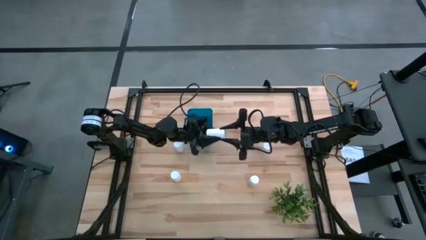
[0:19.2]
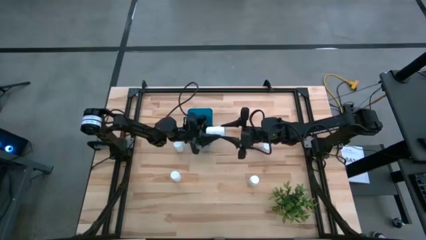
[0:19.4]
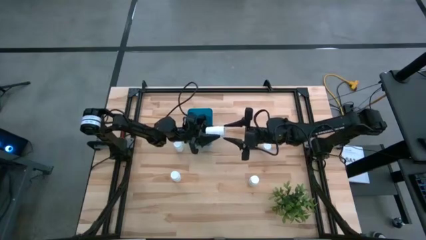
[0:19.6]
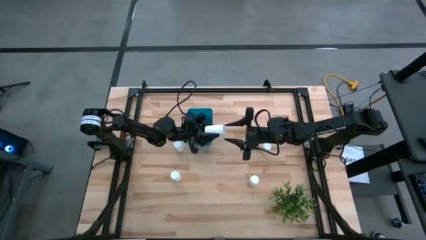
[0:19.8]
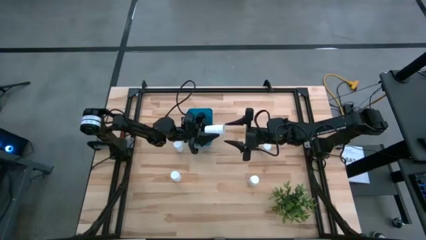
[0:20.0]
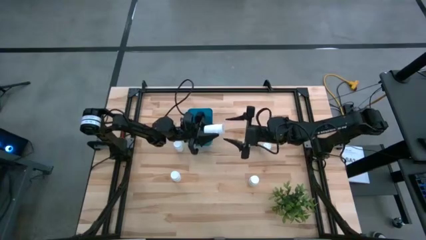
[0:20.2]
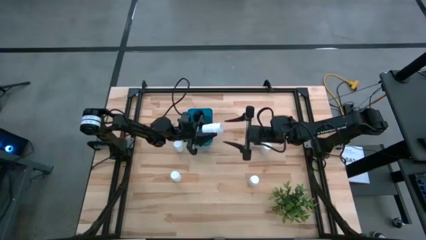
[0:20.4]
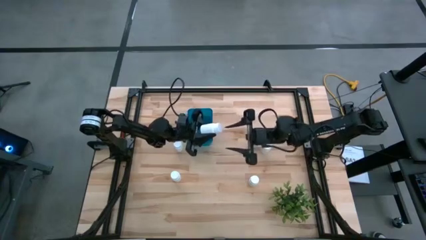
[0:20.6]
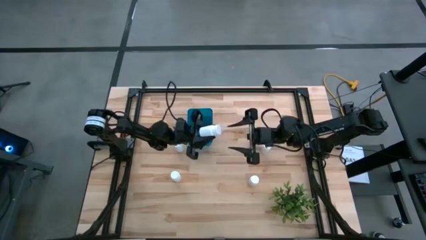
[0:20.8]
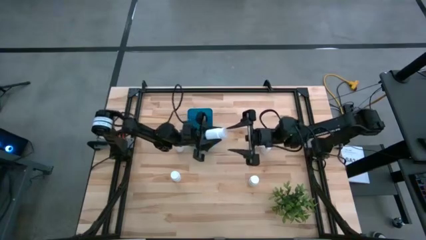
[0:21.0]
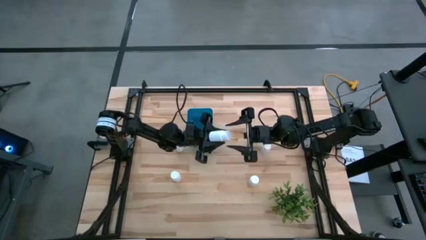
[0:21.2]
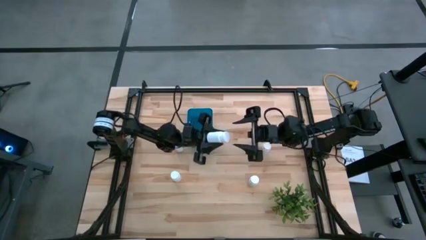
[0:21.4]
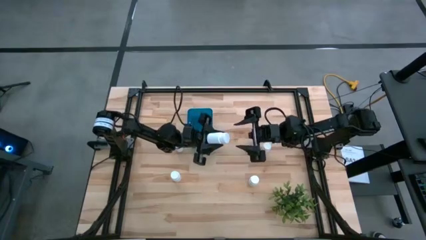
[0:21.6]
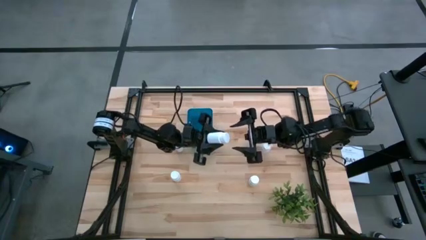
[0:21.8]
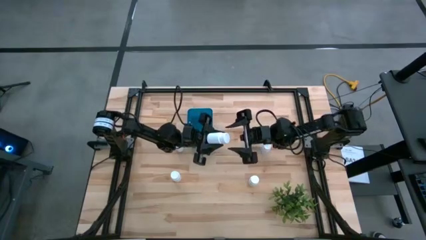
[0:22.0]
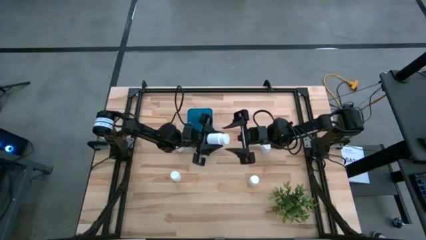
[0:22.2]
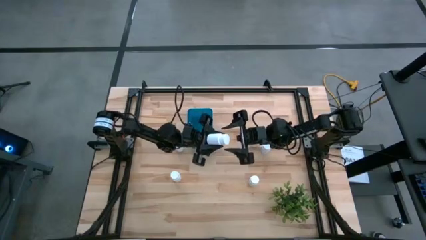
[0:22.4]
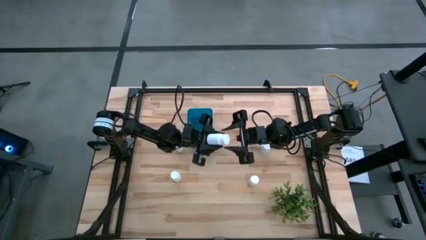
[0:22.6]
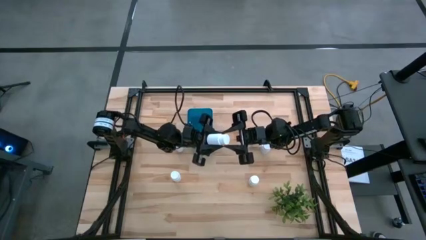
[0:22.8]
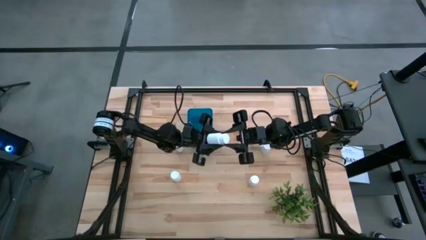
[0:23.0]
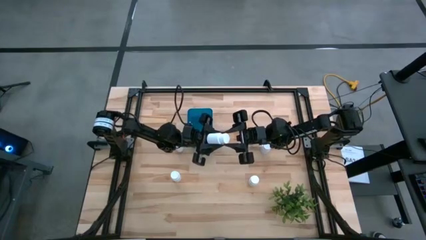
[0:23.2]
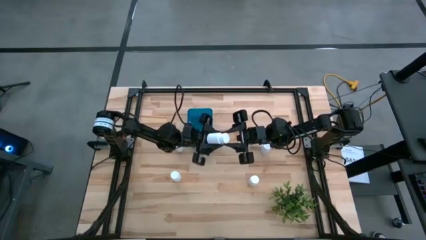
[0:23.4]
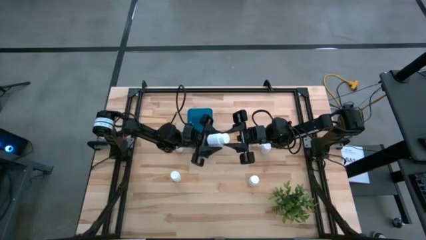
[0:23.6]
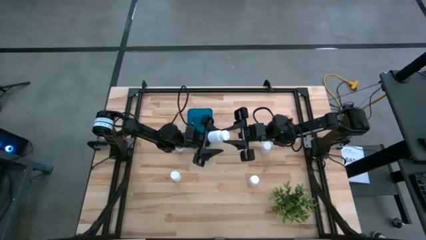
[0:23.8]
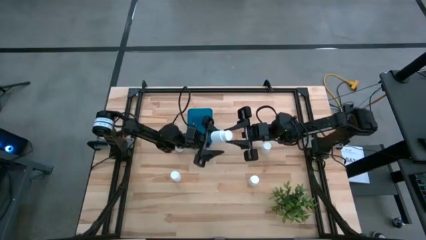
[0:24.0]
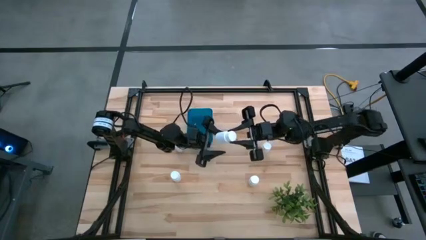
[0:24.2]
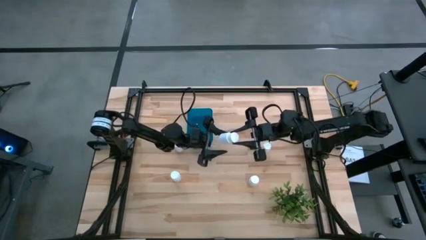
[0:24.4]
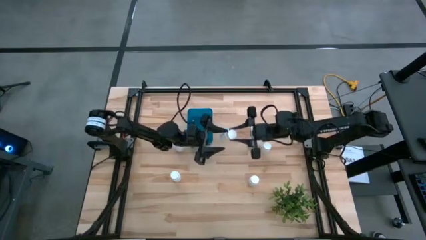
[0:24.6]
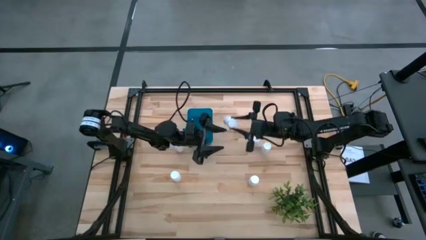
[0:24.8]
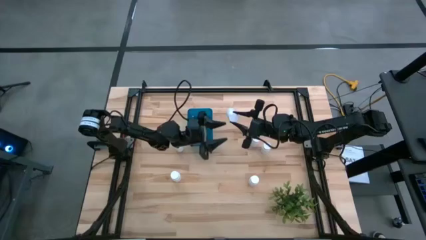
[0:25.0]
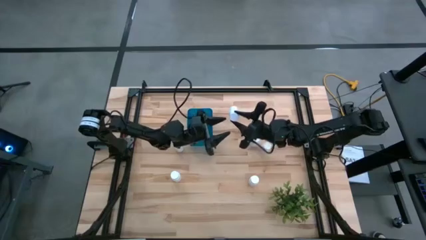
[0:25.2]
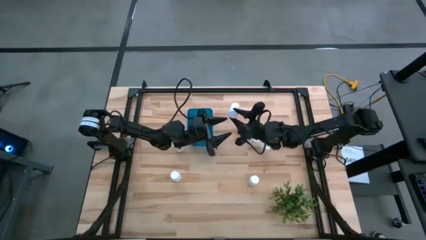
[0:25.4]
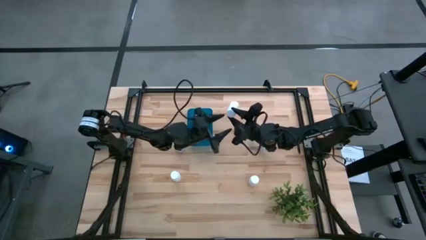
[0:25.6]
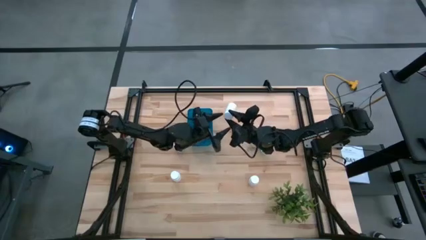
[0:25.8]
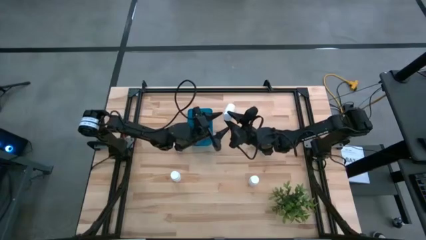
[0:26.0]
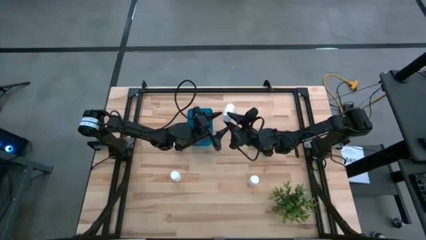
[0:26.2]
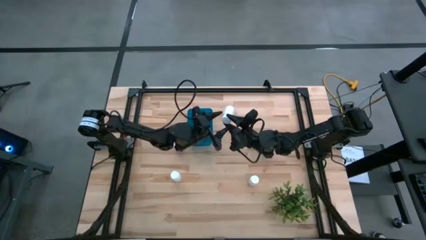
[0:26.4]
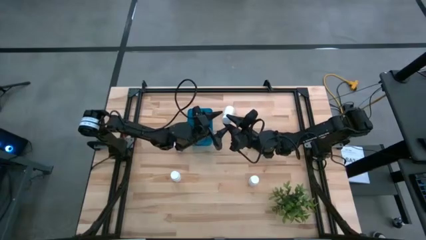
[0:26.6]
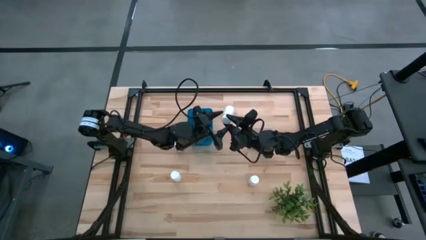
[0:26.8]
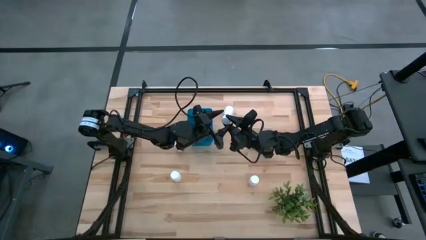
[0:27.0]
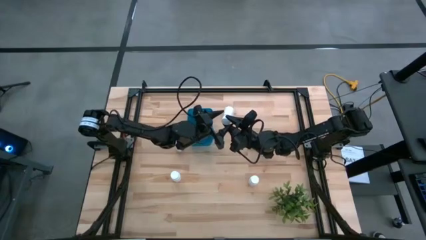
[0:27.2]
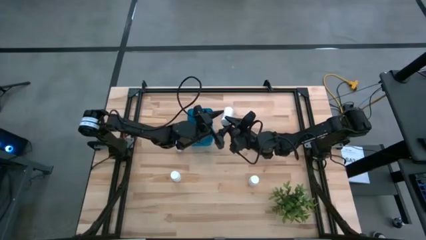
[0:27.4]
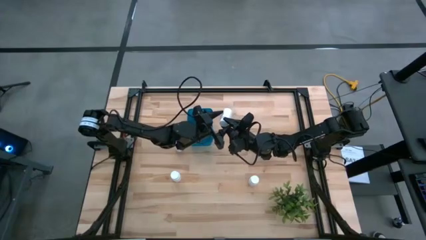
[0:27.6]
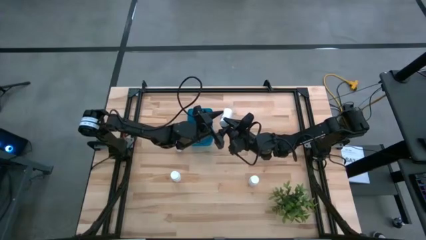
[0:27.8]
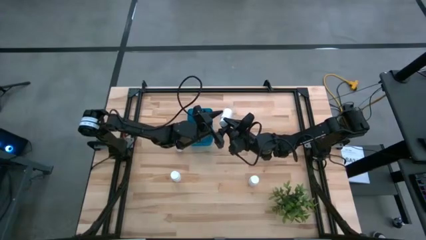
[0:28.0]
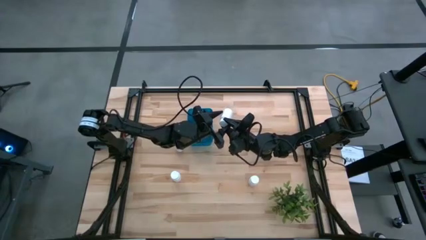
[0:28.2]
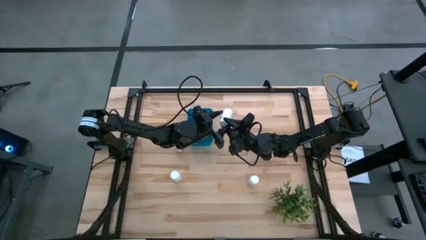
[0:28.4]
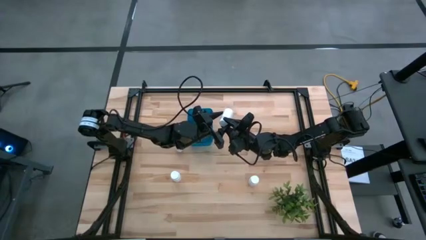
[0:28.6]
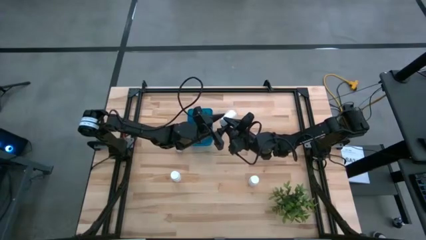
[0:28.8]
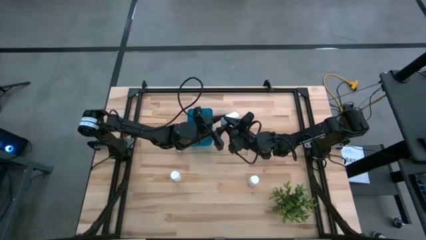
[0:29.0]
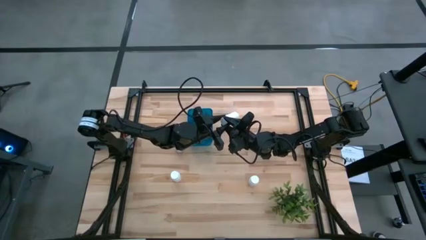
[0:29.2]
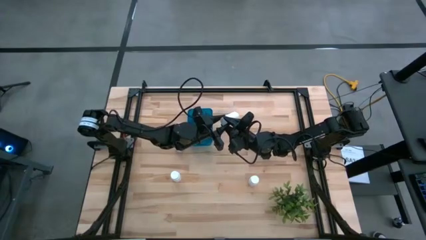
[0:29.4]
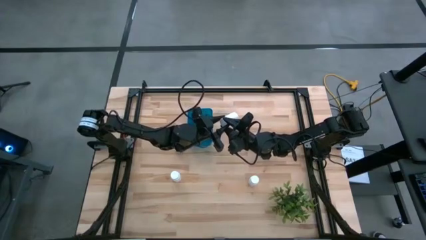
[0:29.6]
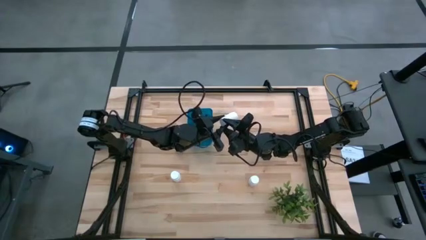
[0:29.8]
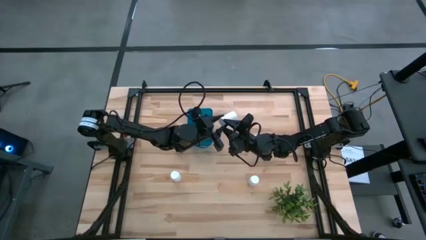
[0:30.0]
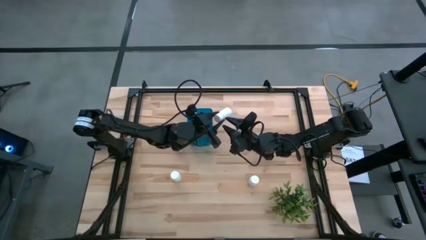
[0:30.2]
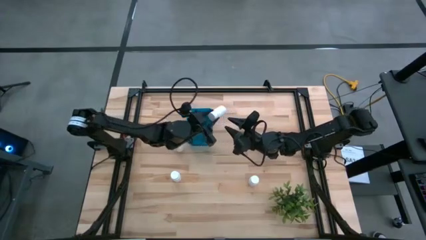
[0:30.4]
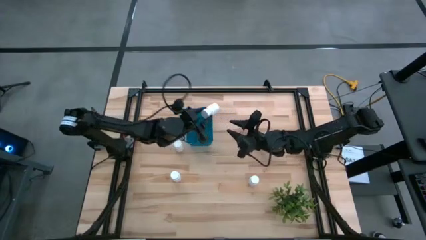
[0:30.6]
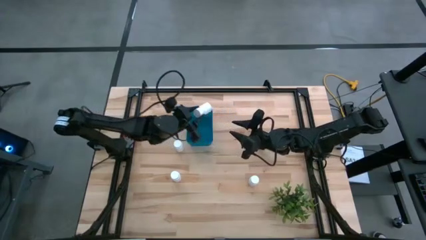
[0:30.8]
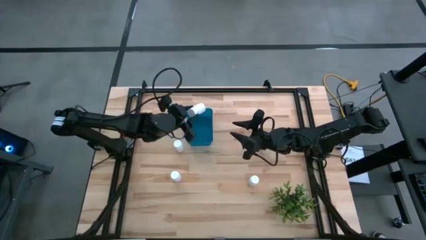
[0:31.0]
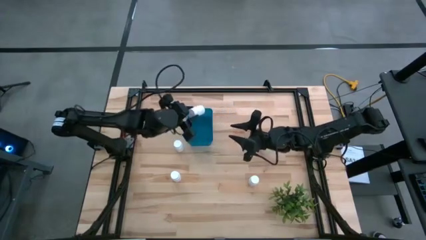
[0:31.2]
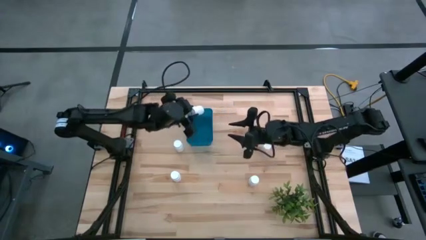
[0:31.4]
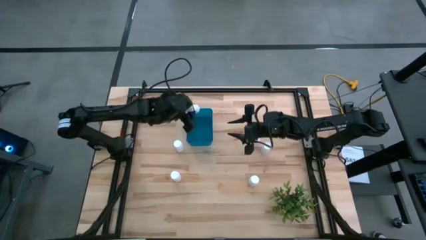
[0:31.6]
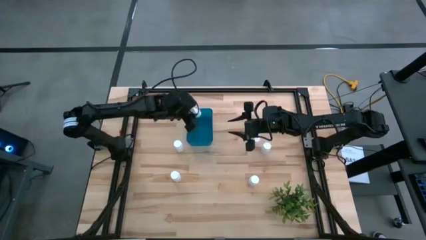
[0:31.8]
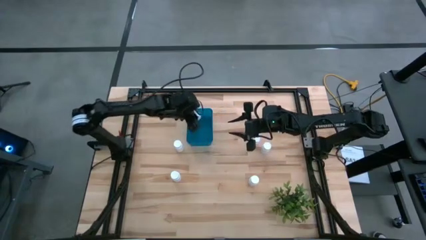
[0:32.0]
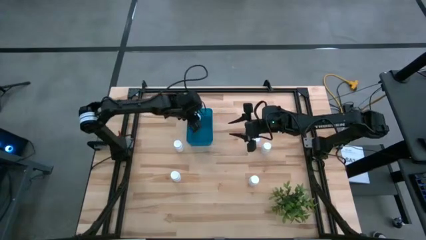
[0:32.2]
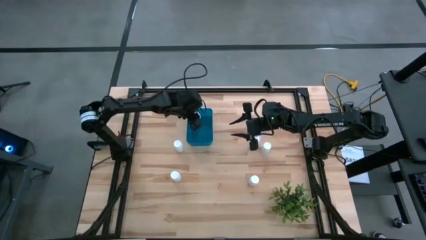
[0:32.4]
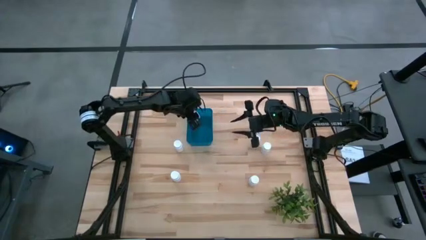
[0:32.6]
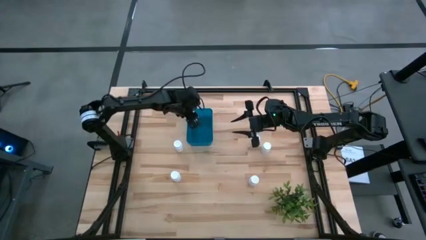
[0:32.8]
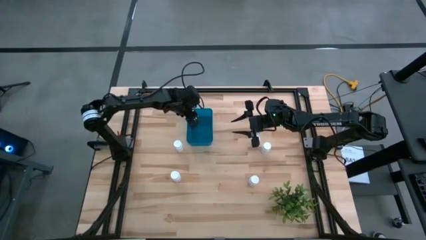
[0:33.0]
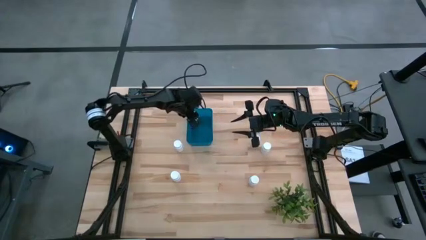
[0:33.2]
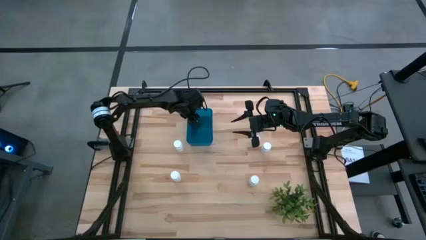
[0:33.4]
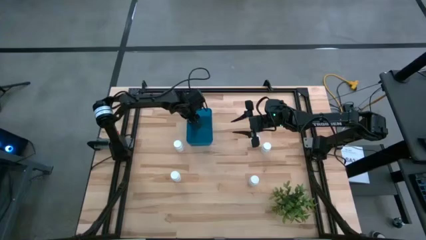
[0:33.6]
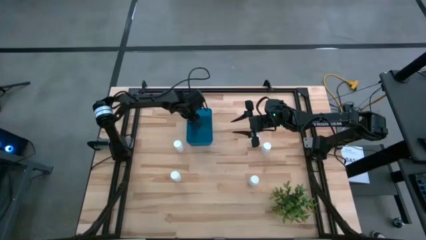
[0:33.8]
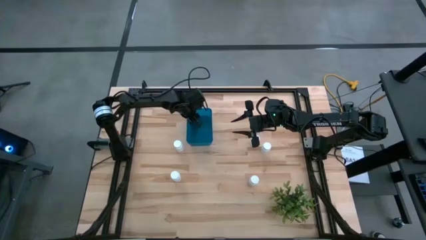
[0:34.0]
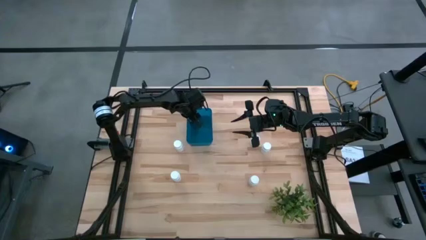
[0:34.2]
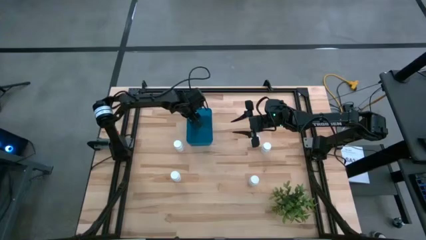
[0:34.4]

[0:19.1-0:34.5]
Task: Pick and place pill bottles into a basket
Put the white medicine bottle into the blue bin
